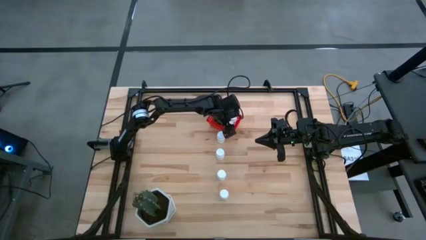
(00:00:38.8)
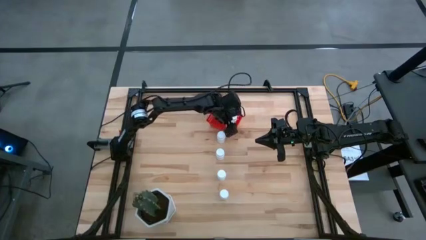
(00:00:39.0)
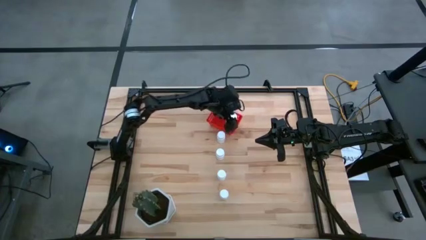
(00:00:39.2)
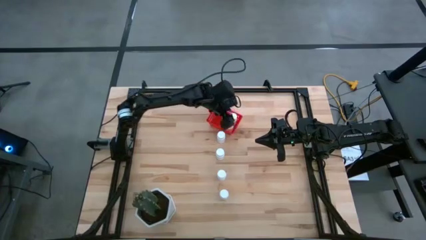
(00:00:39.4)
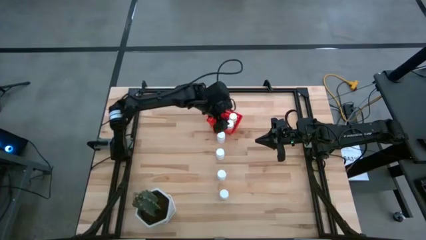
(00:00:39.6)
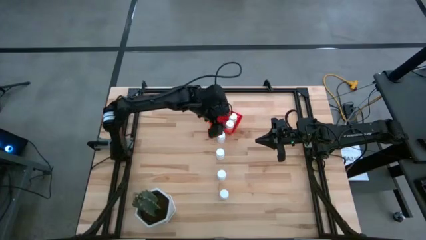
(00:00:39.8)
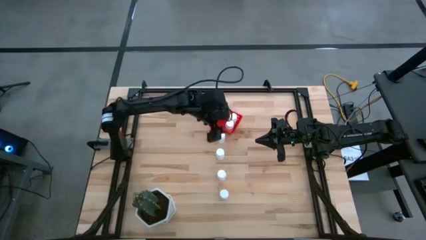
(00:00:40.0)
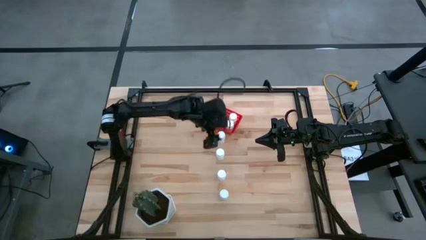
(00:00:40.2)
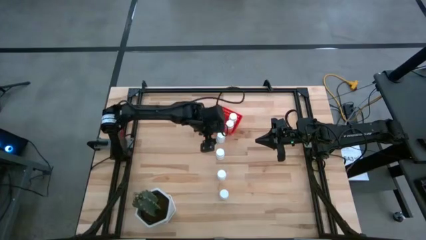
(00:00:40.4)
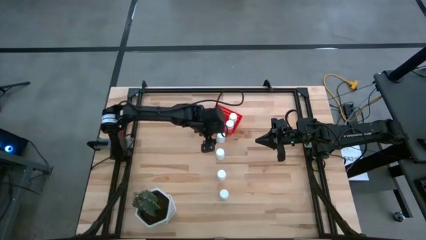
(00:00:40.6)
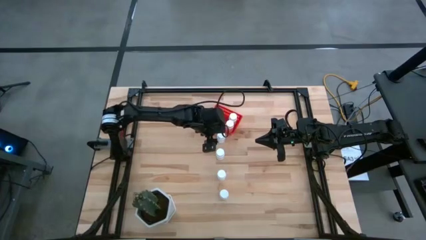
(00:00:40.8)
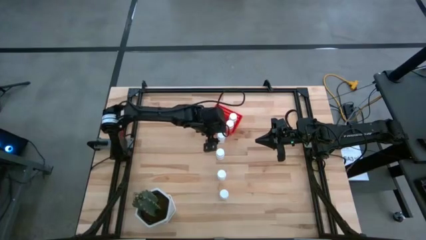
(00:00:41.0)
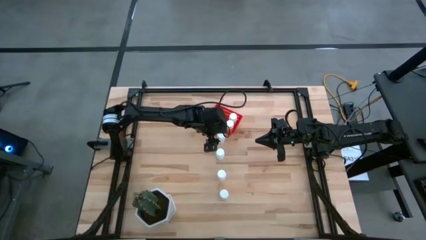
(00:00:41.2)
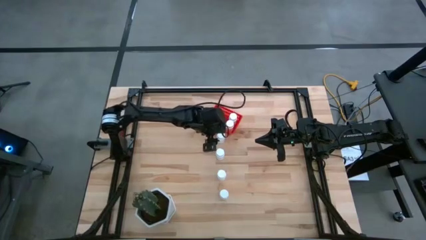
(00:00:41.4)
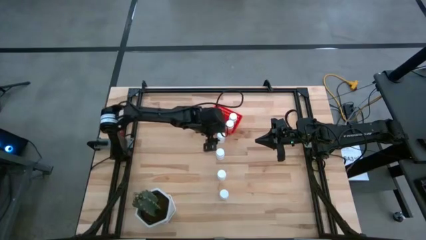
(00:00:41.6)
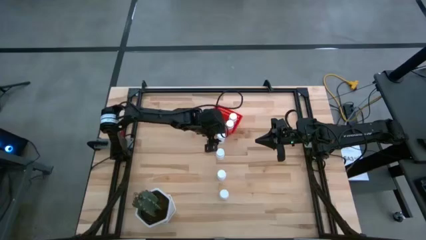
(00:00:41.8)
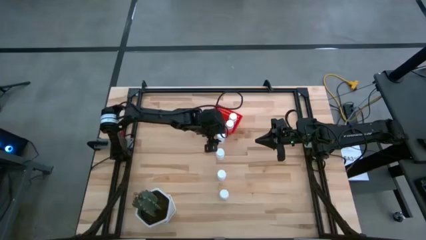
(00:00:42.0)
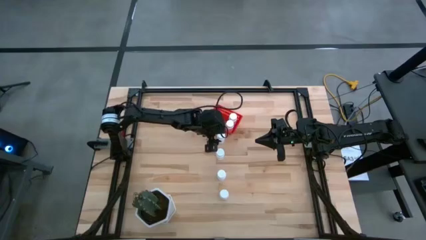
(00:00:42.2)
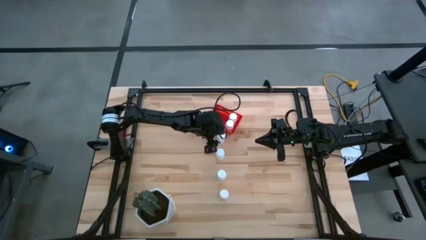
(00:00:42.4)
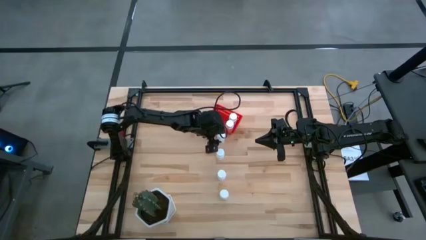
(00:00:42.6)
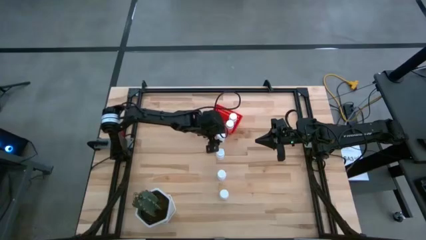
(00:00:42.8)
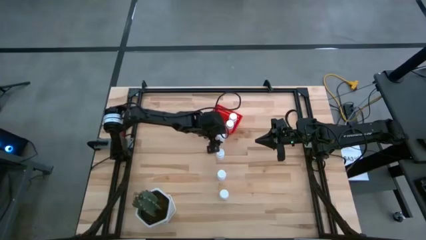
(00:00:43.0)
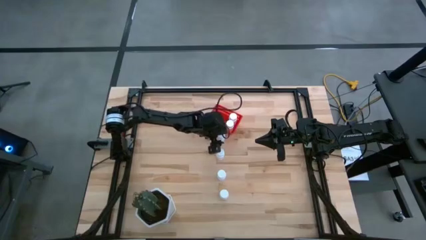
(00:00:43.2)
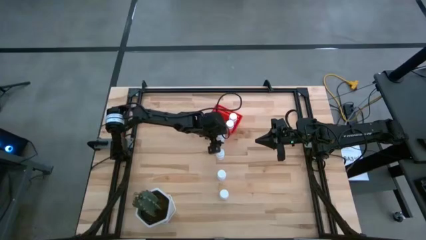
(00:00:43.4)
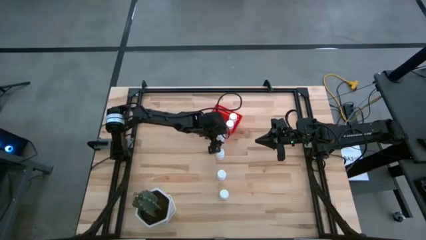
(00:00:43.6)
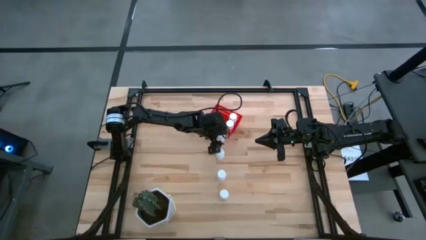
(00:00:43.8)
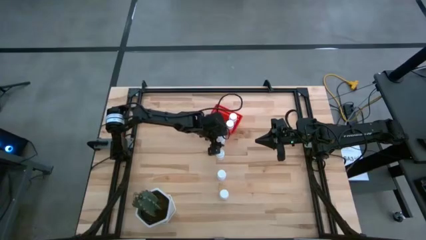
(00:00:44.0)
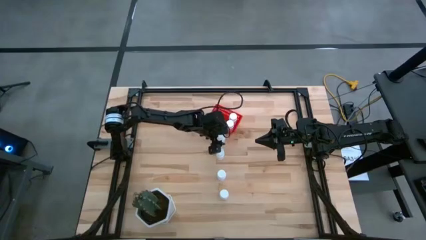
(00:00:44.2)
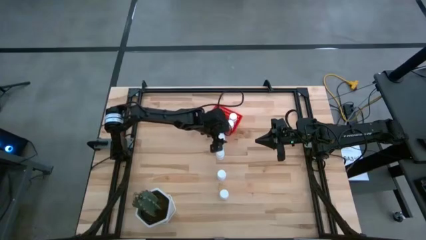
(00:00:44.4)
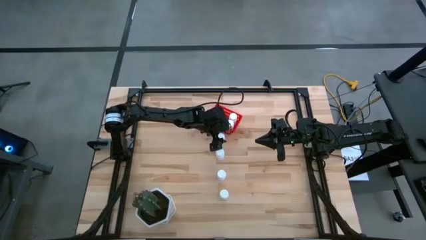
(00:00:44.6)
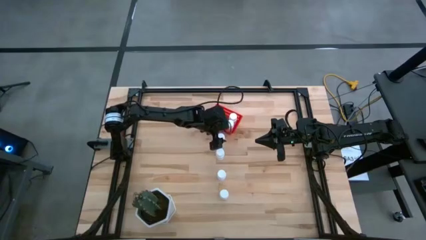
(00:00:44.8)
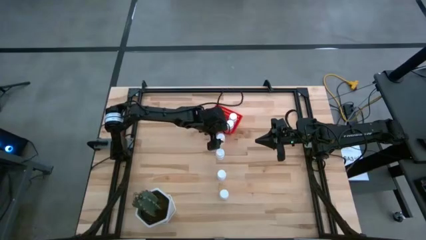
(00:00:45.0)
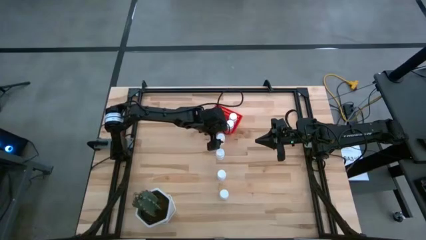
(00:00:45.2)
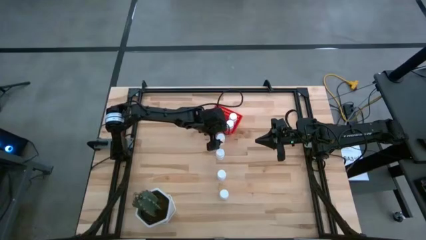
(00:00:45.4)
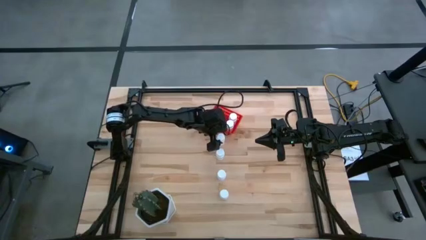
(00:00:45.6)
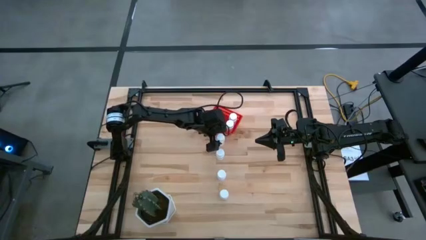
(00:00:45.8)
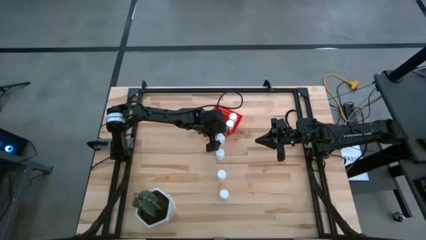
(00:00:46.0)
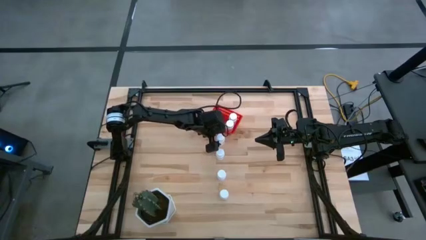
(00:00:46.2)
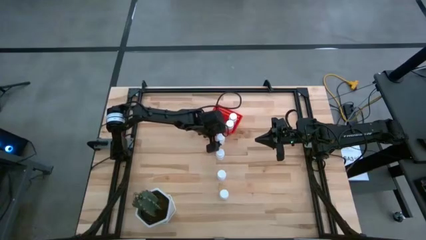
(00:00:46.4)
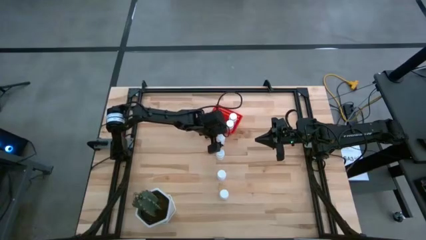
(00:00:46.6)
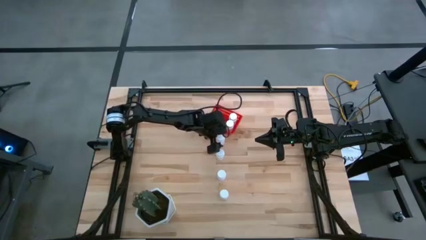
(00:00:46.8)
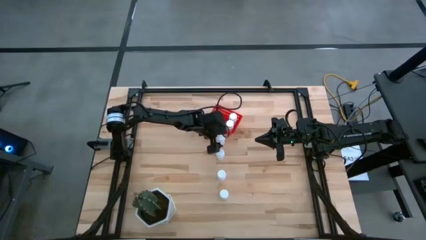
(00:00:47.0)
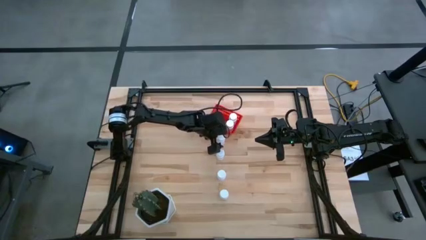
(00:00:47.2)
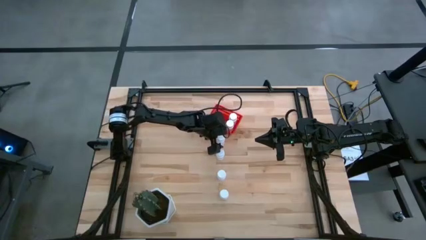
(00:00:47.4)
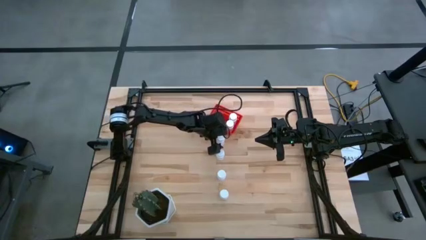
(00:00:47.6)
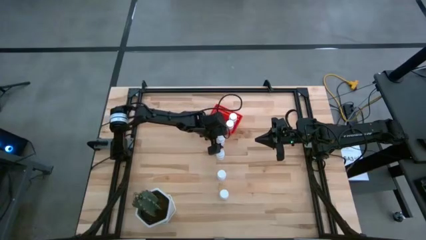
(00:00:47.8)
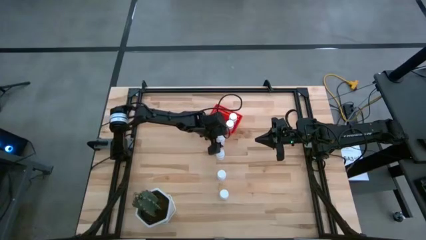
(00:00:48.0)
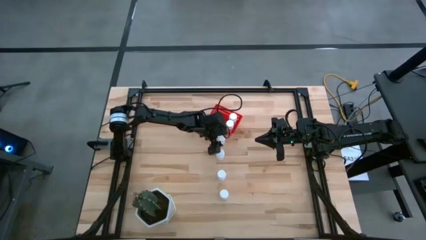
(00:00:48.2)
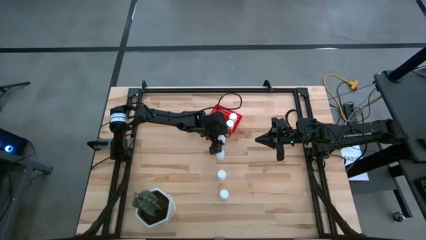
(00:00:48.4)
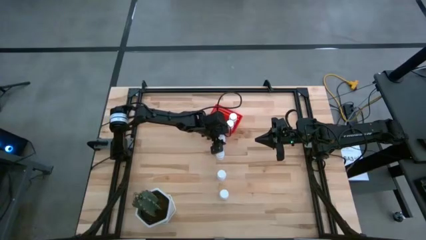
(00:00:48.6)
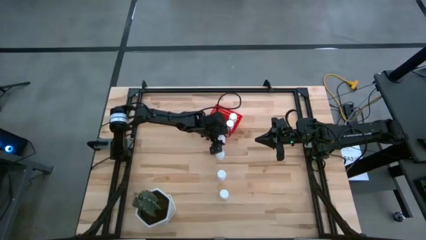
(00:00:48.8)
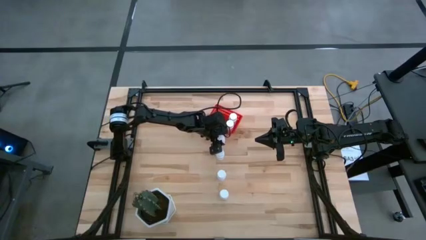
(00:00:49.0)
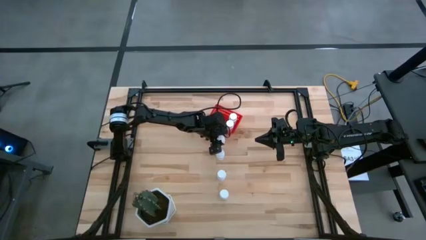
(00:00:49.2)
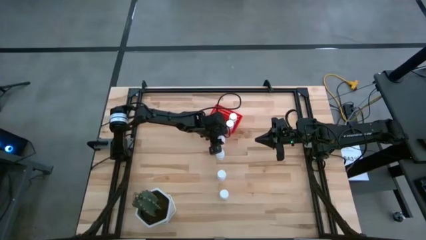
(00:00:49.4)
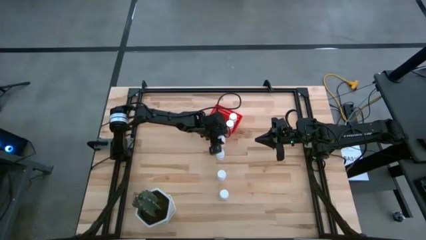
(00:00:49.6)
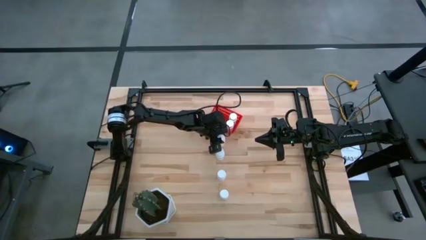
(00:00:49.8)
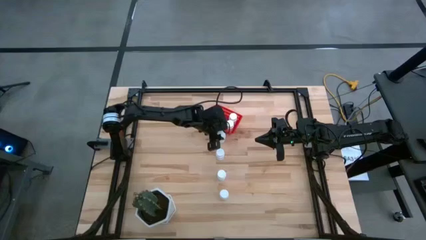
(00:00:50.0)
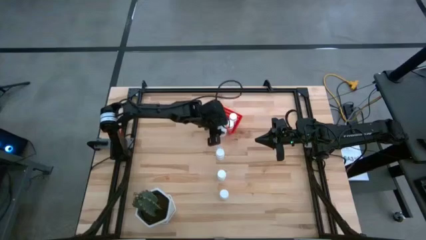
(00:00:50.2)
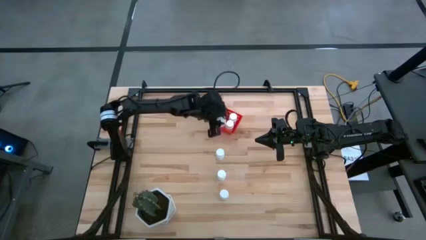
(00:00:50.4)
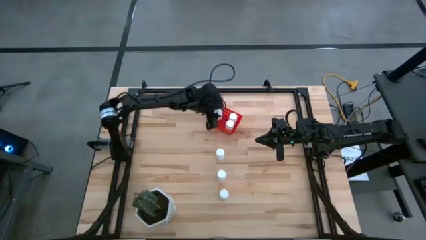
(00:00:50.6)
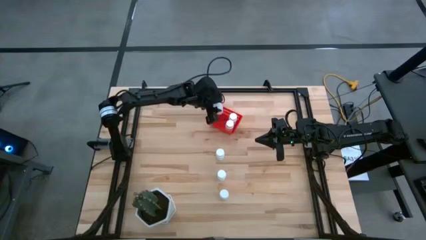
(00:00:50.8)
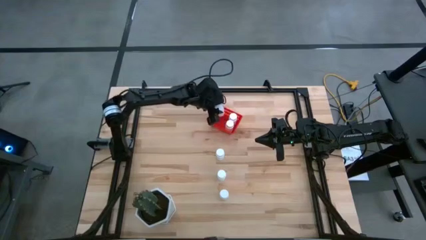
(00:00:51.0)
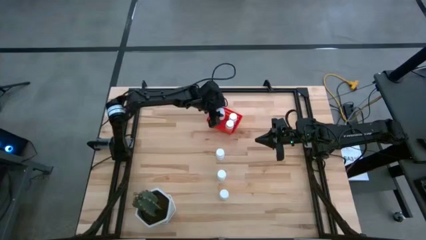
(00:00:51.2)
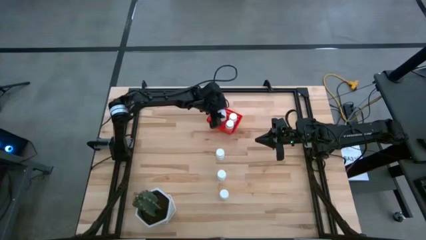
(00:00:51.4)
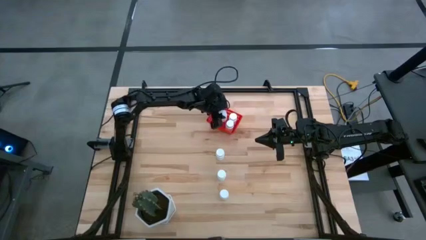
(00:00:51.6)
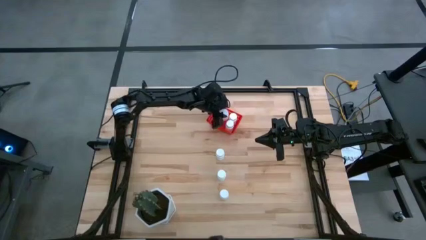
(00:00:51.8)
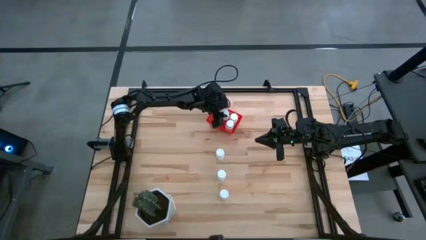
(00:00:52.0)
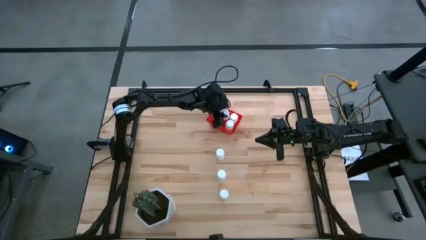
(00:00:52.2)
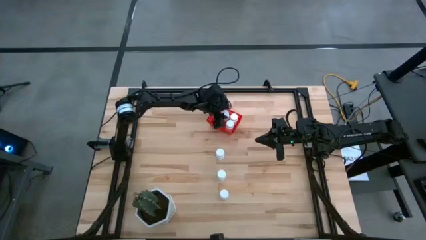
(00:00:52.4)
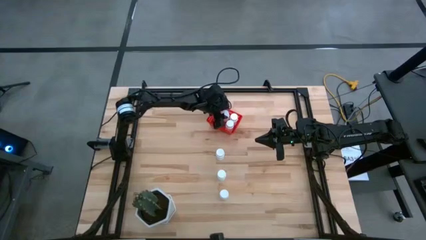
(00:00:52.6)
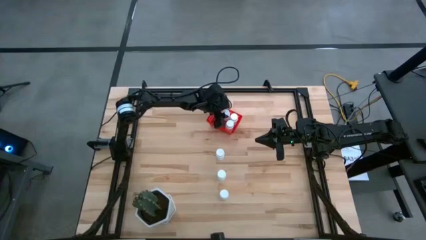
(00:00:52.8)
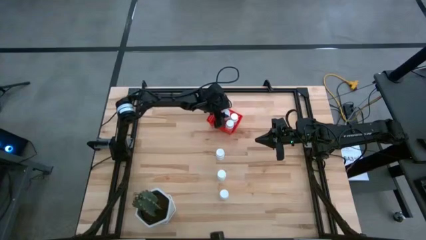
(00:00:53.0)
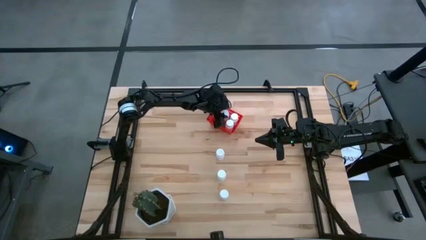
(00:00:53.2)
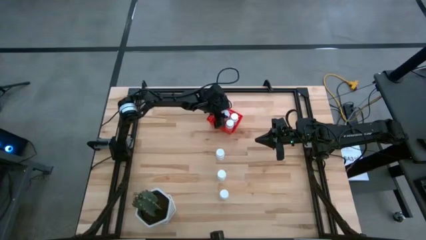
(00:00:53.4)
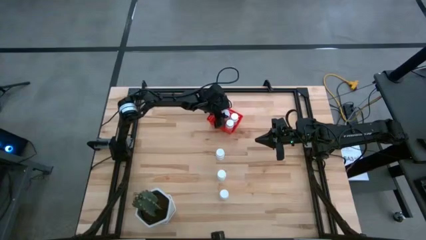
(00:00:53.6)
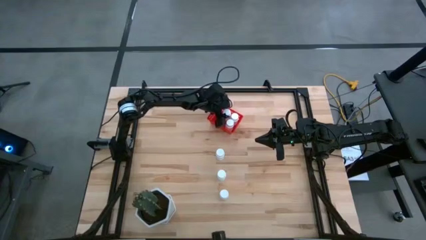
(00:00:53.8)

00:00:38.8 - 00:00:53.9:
Task: Pick and place pill bottles into a basket
Put the white pill bottle into the red bin

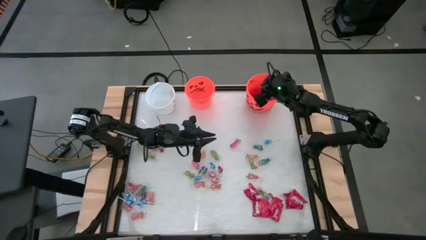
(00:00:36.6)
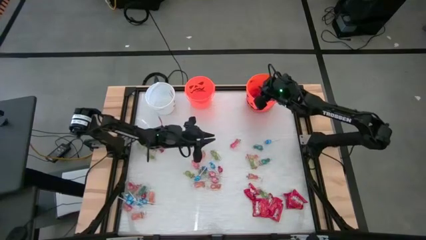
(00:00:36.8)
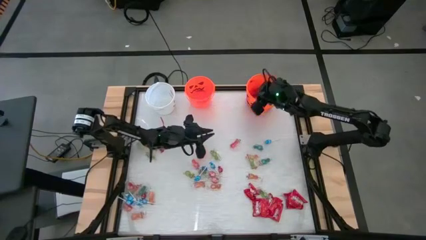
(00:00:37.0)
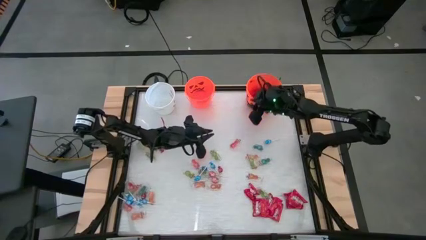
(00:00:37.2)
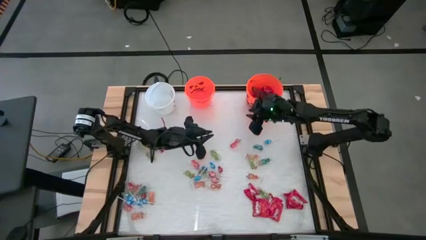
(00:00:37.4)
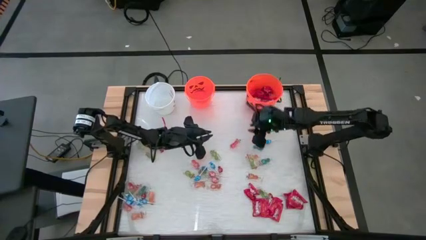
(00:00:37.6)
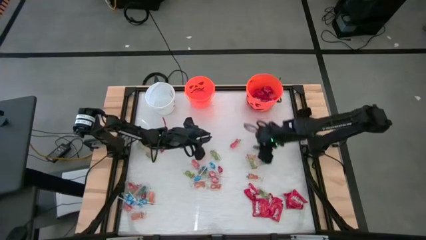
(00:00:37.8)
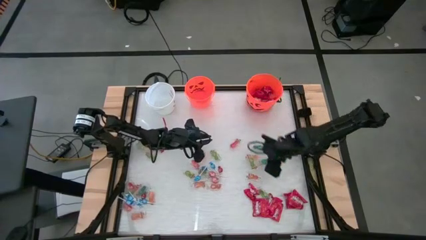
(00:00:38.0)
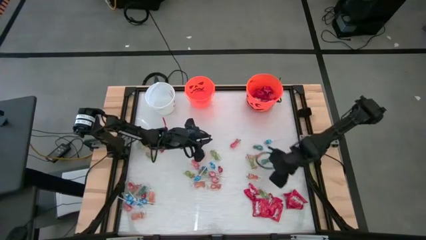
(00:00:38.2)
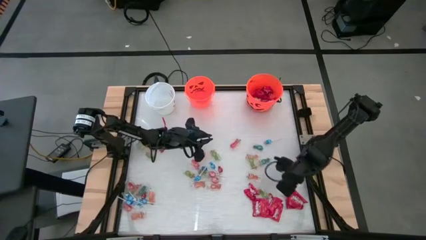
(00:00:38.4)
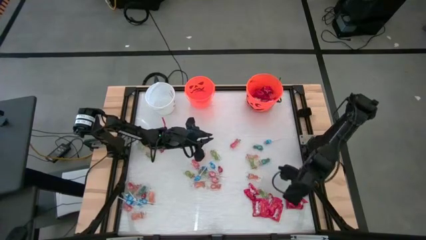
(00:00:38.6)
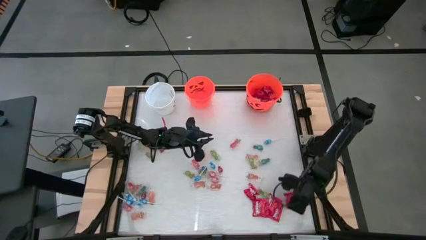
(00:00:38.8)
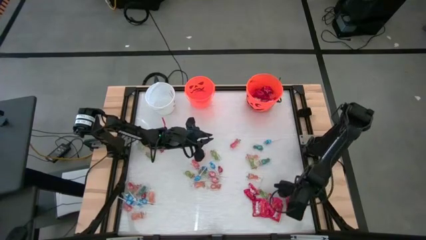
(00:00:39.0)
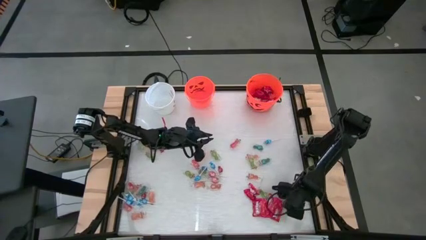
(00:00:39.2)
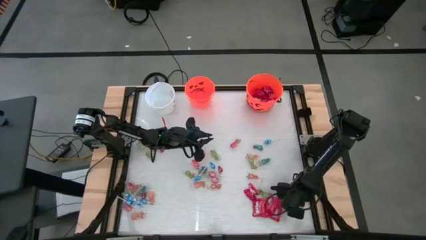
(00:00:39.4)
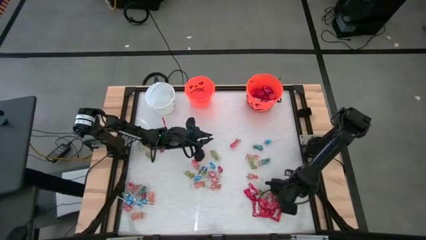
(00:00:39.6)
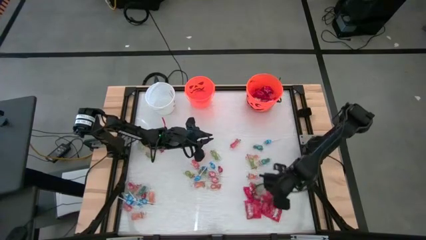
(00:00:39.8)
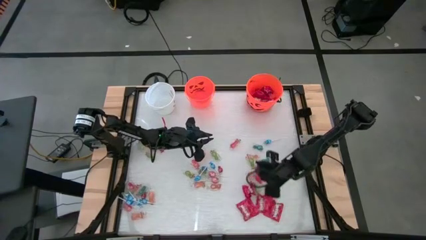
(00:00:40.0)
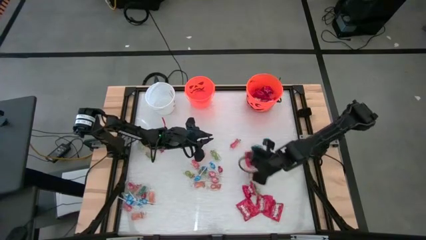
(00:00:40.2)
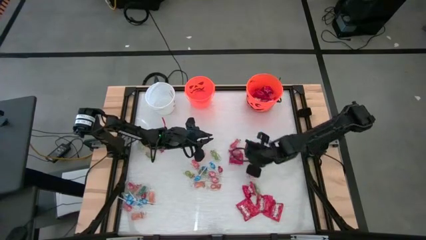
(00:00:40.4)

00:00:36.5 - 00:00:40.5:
Task: Sort candy by brand, put in halloween buckets
Put the red candy into the right orange bucket
